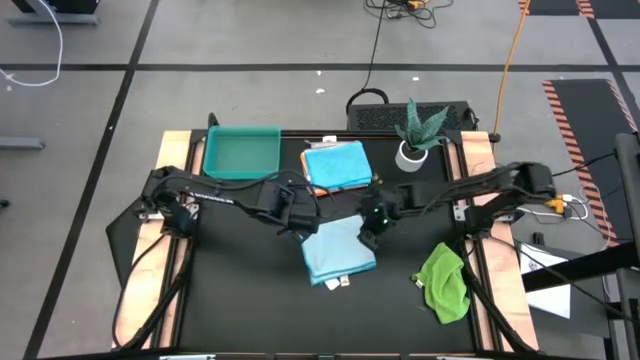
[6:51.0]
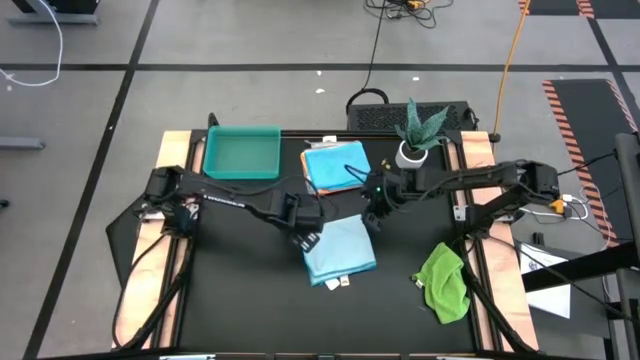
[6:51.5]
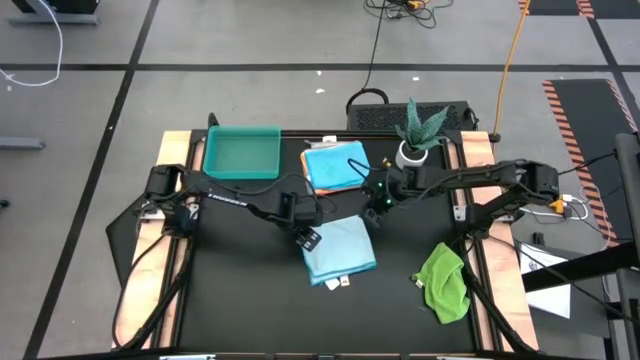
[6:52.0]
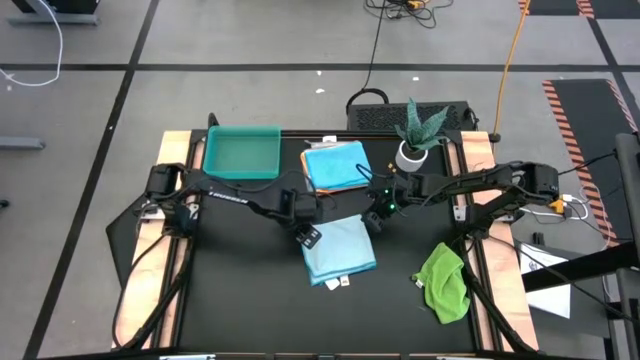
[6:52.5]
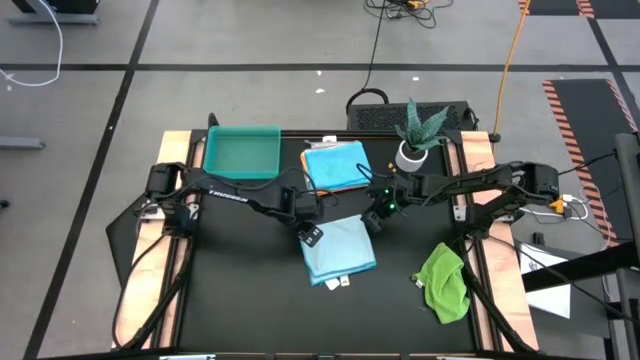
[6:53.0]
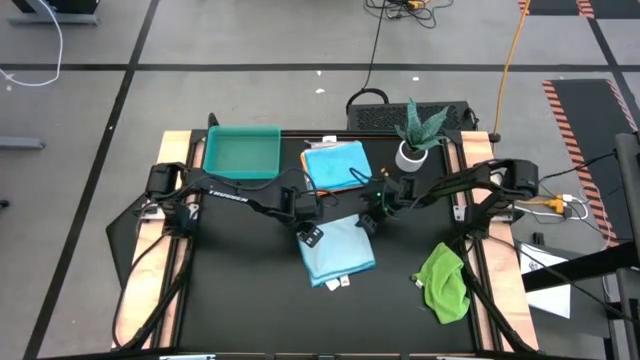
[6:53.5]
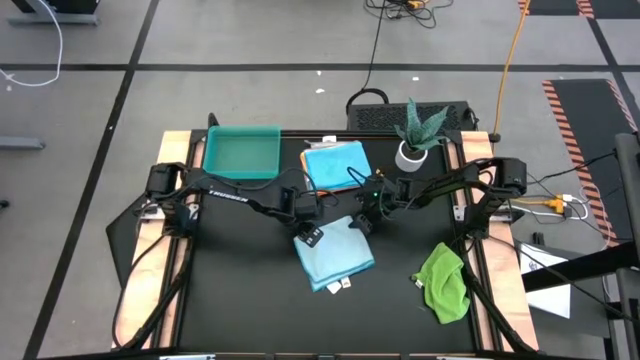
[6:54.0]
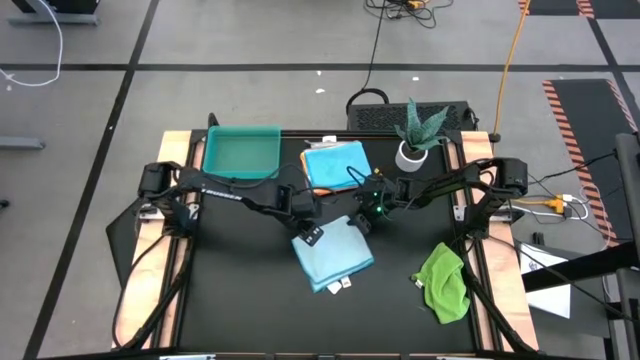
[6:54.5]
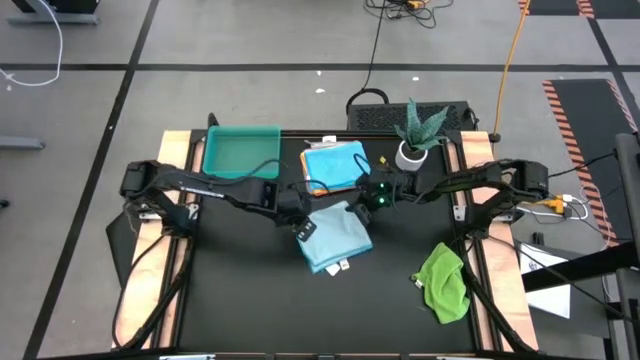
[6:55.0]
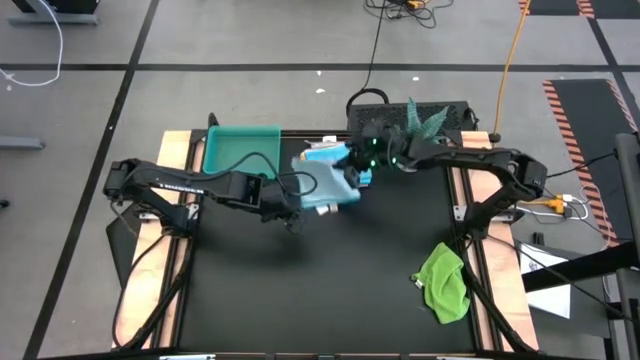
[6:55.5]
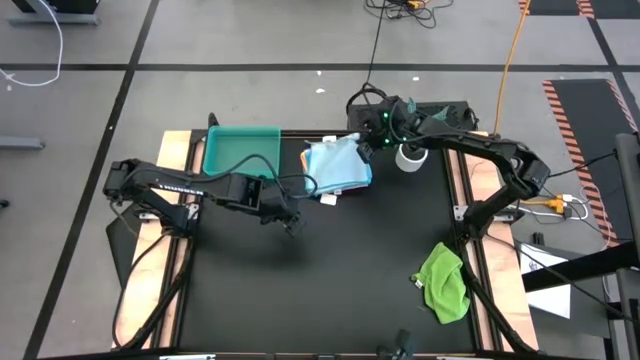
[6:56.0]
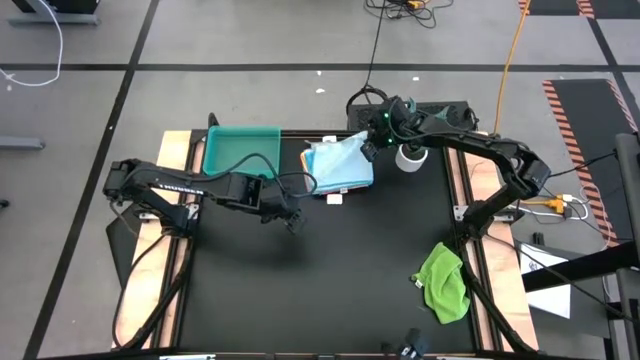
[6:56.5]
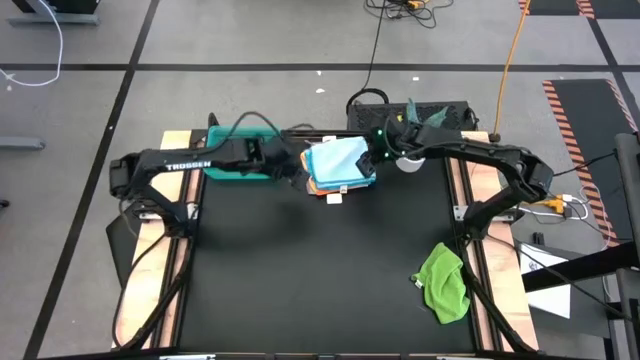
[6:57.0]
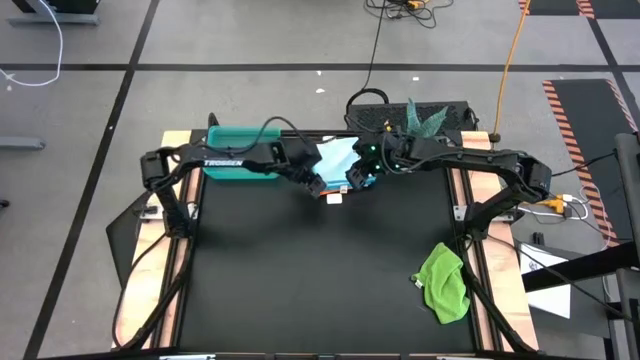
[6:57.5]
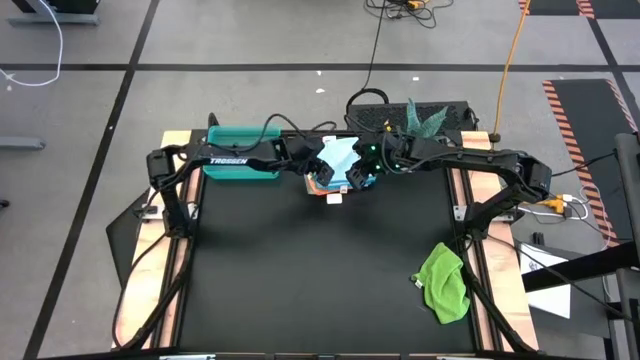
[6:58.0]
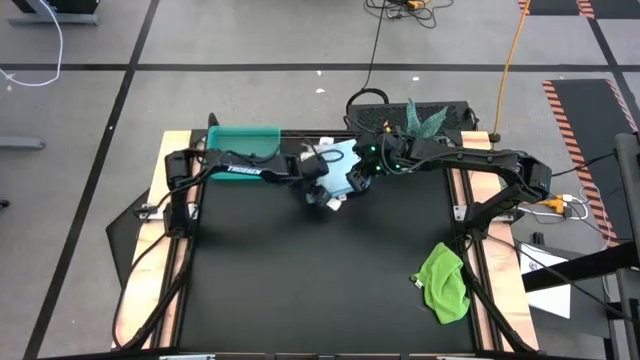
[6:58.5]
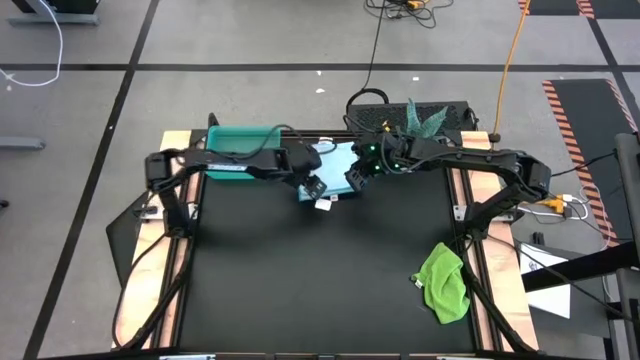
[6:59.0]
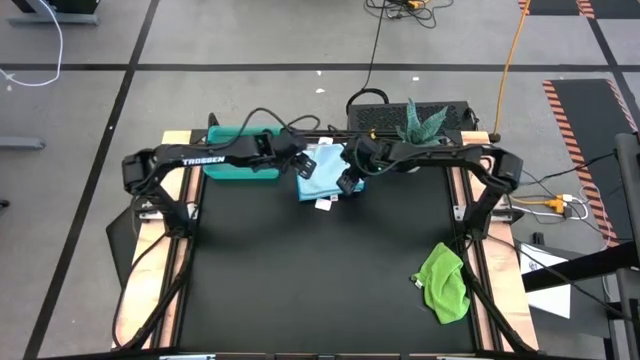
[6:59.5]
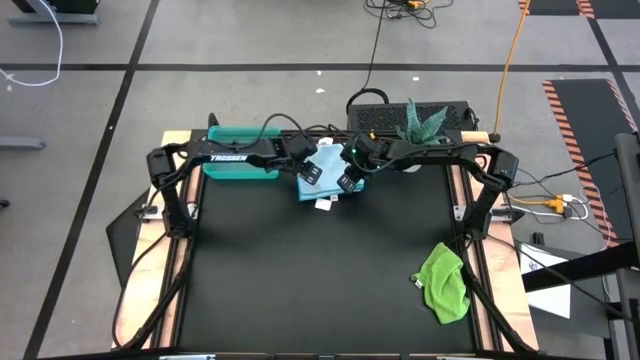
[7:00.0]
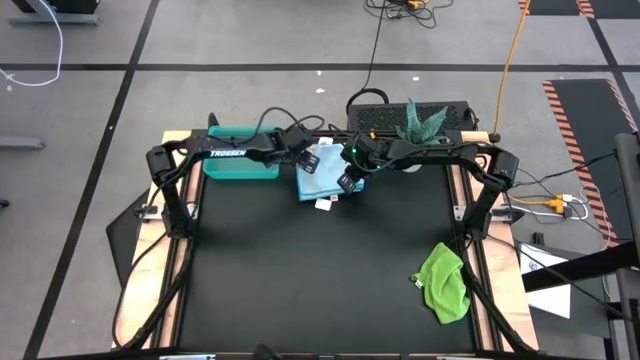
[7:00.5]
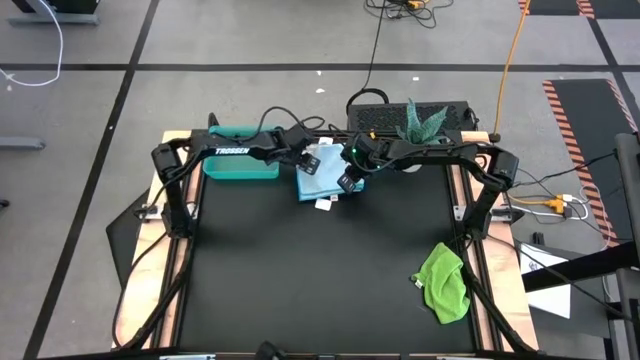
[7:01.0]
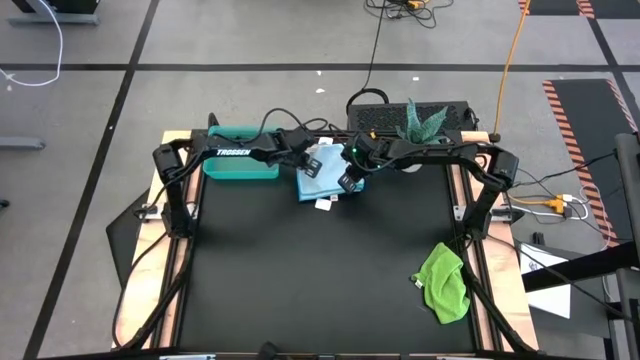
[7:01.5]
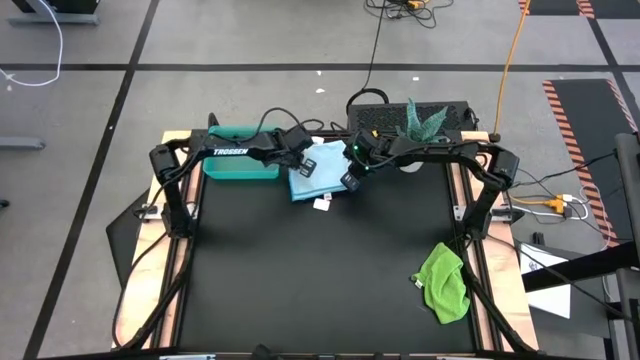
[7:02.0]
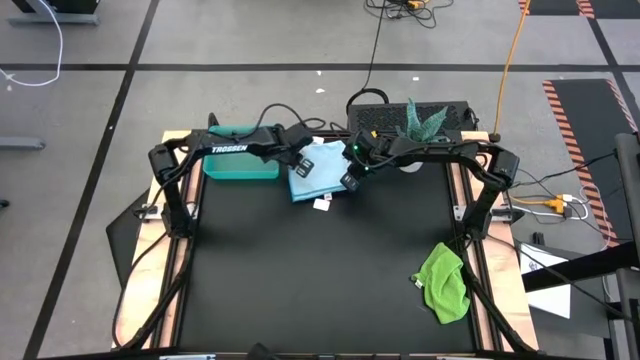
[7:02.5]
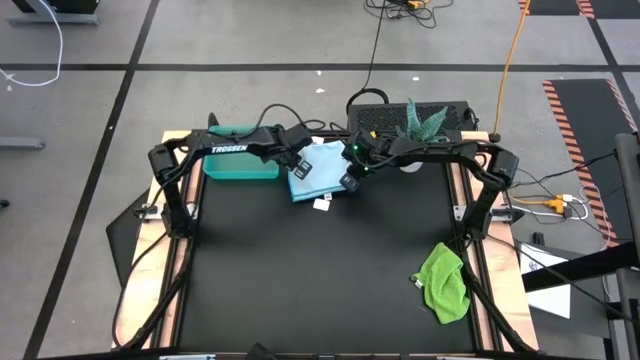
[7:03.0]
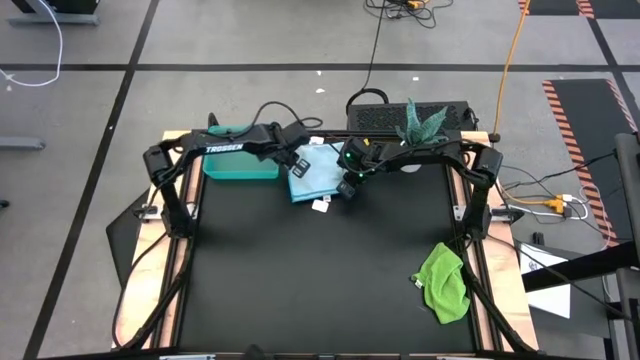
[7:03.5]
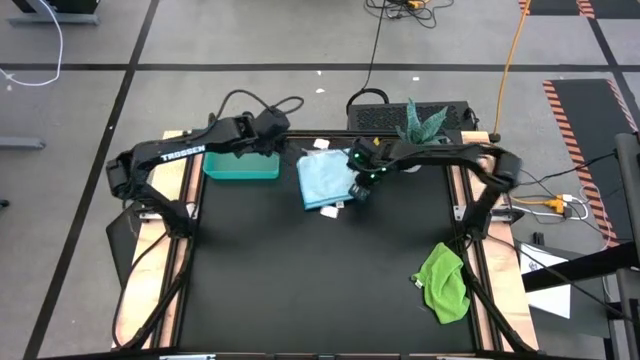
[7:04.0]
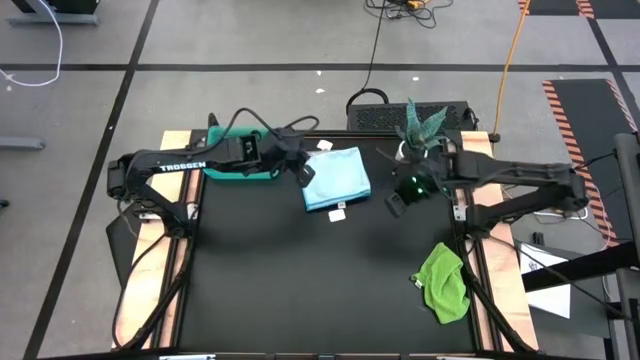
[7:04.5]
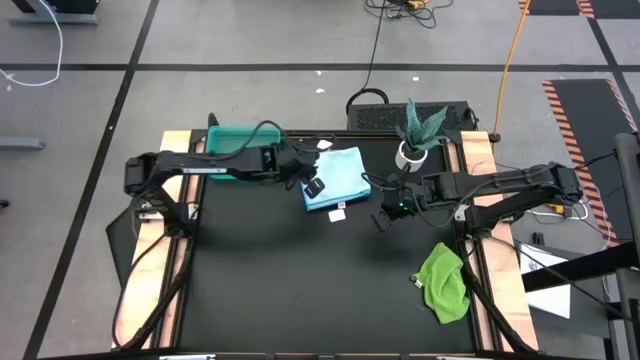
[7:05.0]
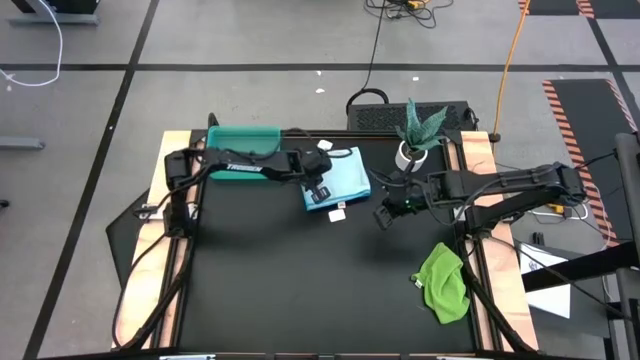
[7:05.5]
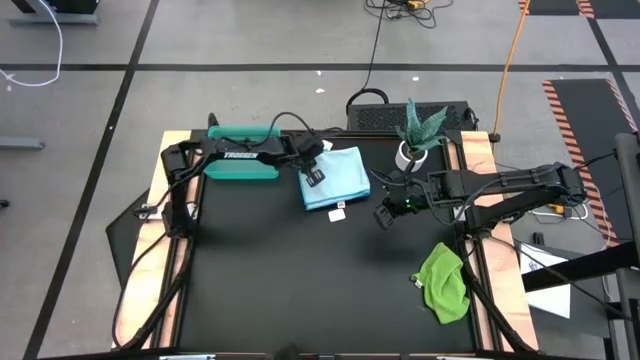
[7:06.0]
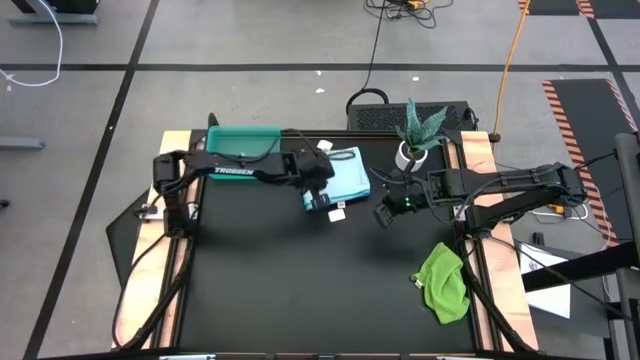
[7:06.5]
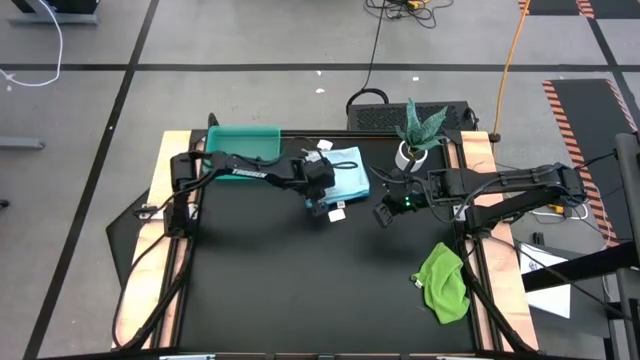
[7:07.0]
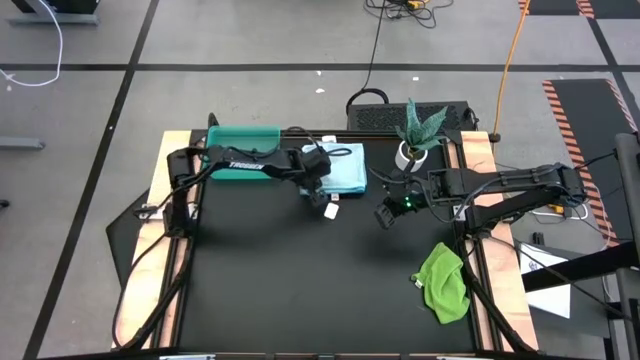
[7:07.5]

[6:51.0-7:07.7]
Task: Fold microfiber towels
Stack the folded light blue microfiber towel on top of the folded blue microfiber towel

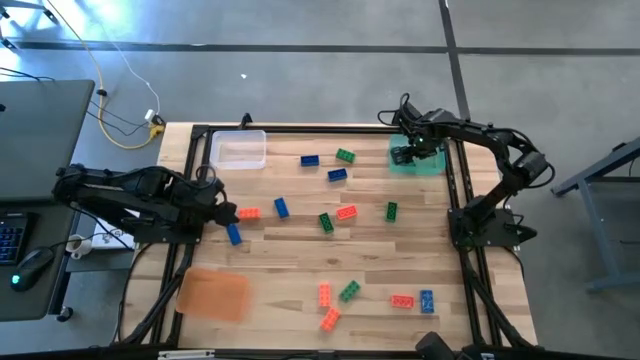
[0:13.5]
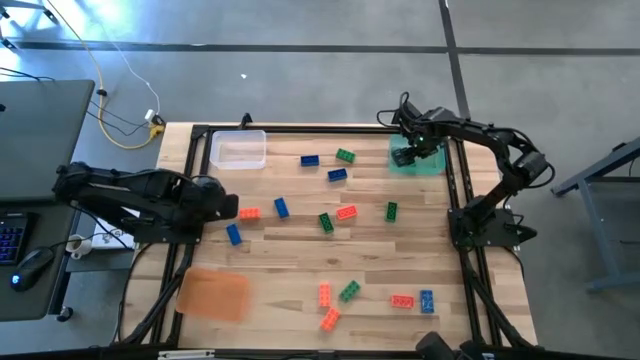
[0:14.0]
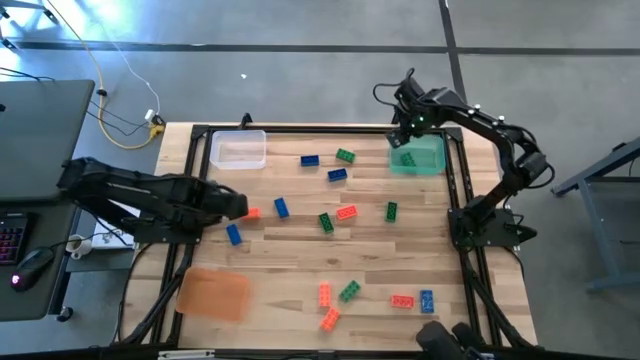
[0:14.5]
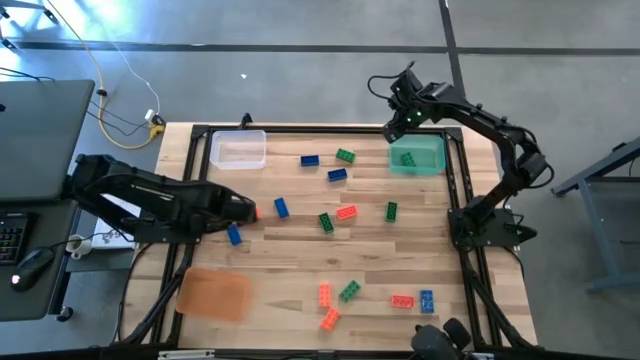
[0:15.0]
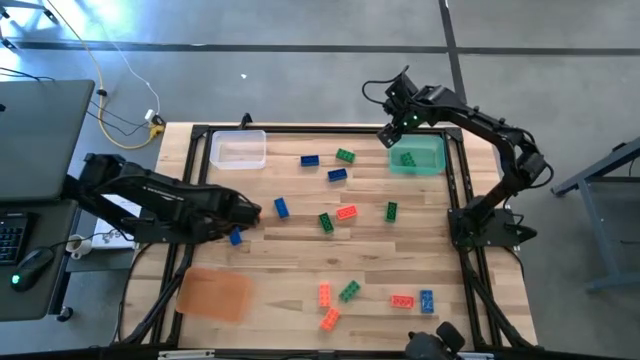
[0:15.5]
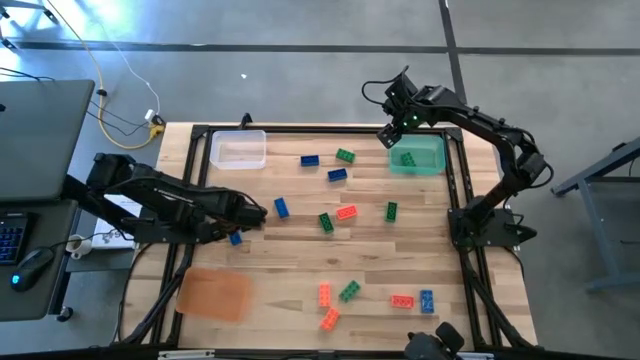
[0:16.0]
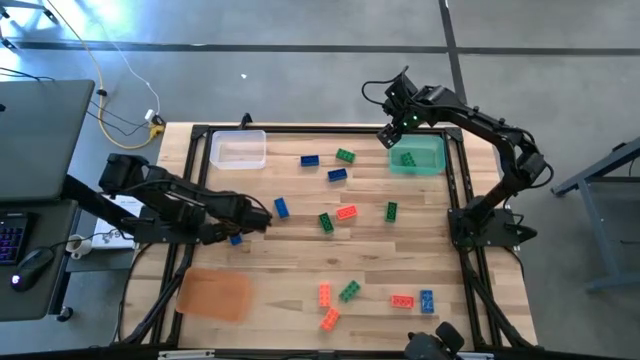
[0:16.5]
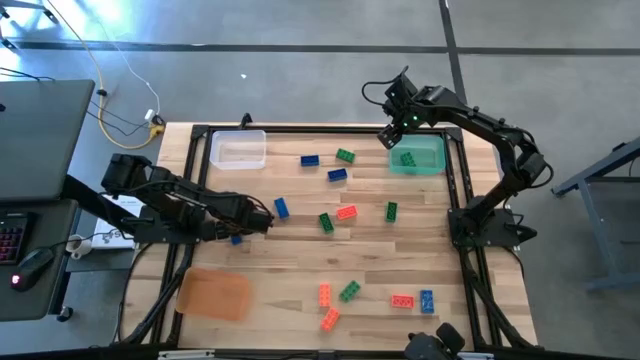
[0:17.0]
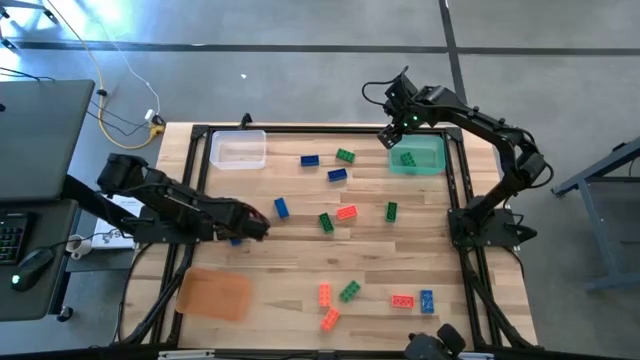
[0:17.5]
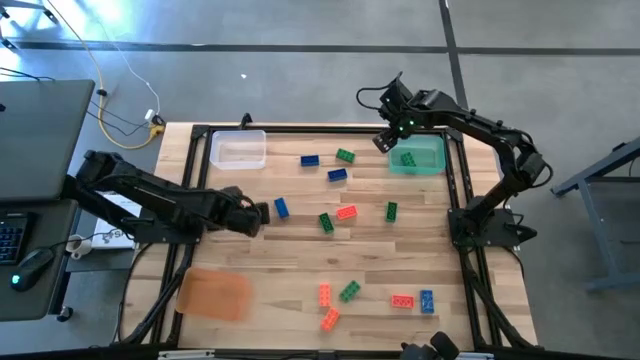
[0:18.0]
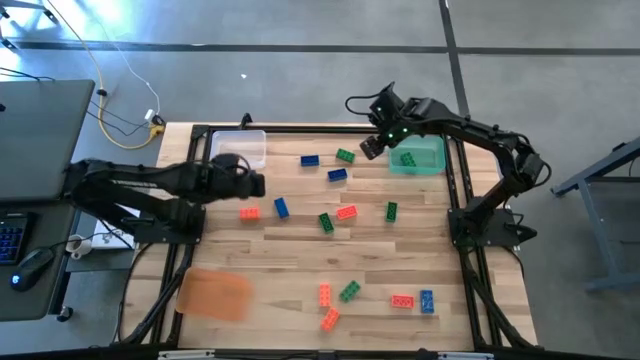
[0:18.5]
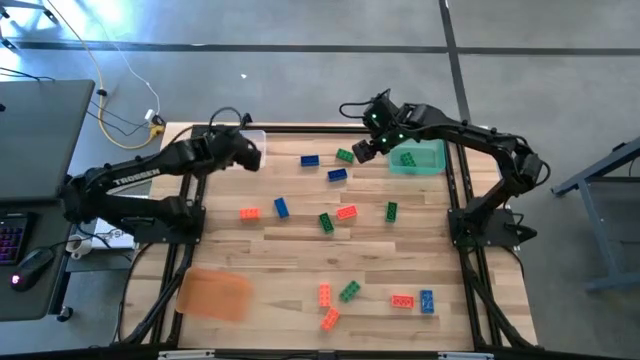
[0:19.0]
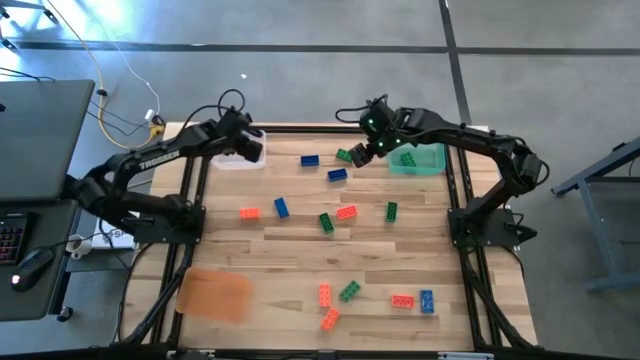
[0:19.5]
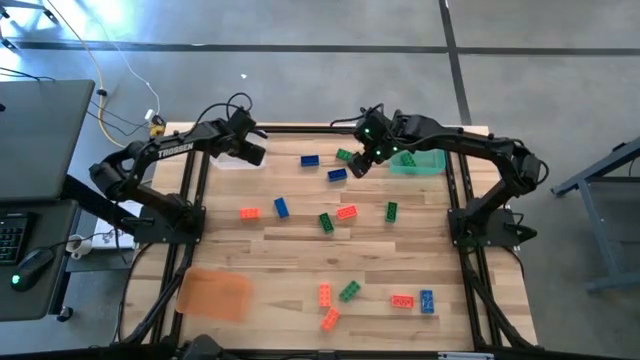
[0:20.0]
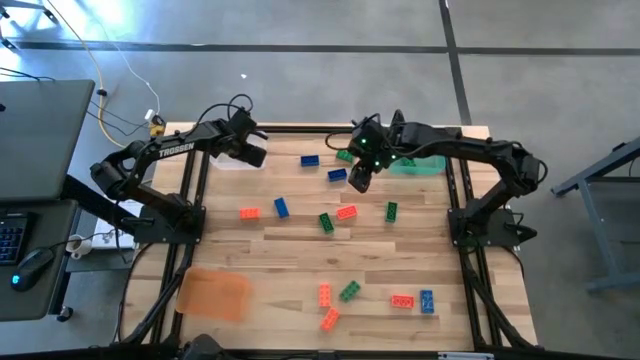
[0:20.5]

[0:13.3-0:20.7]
Task: Sort & place blocks by color
Put the blue game piece into the white bin
